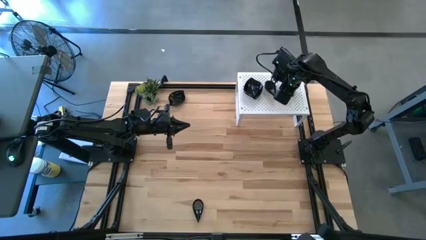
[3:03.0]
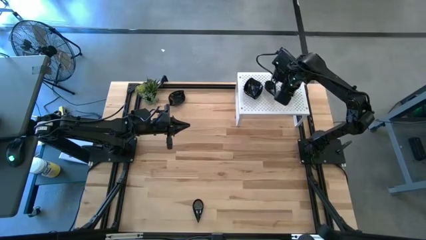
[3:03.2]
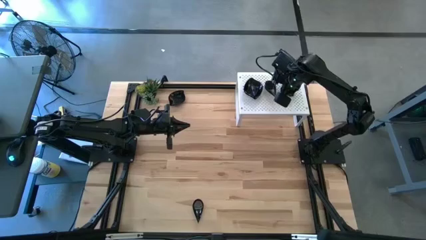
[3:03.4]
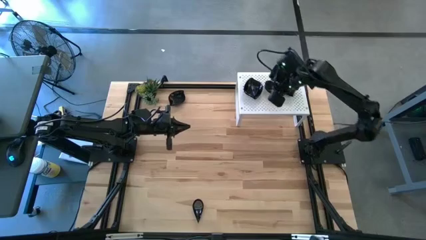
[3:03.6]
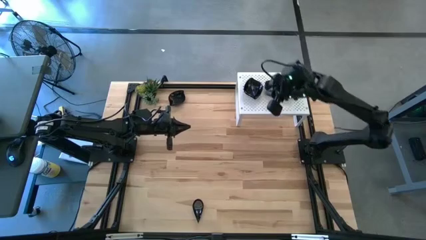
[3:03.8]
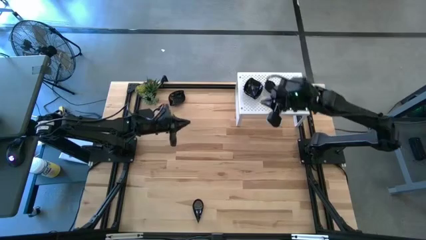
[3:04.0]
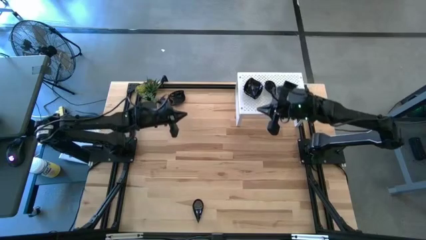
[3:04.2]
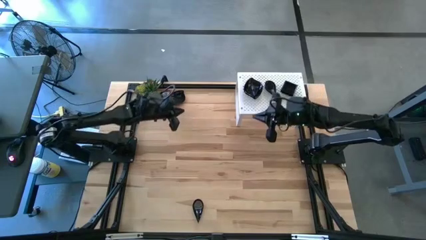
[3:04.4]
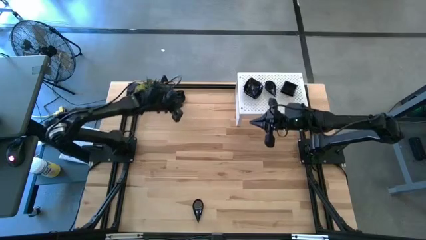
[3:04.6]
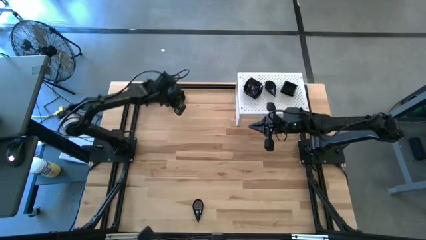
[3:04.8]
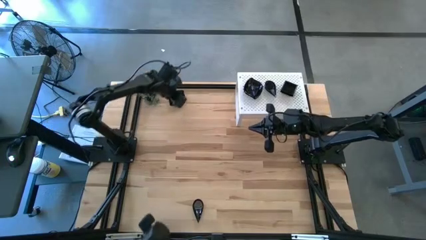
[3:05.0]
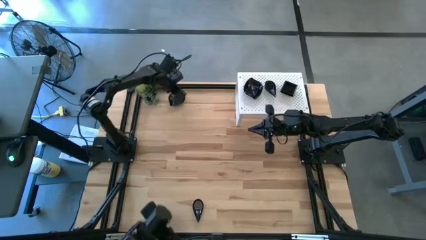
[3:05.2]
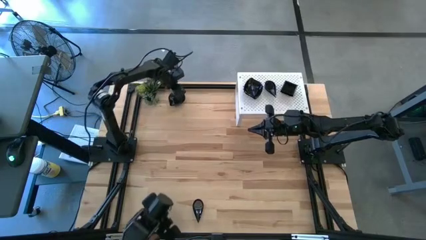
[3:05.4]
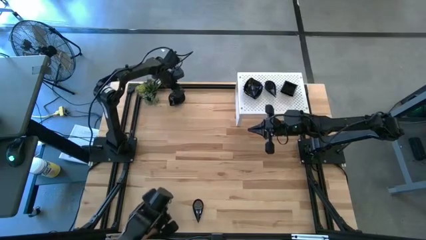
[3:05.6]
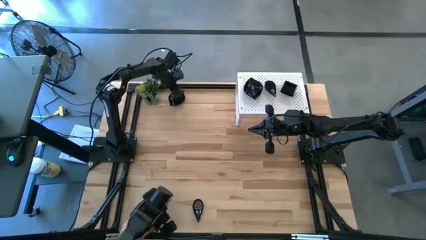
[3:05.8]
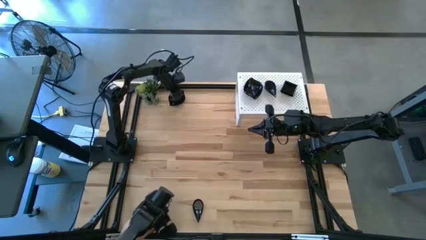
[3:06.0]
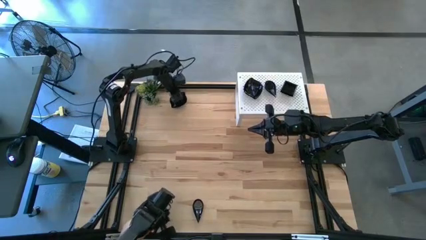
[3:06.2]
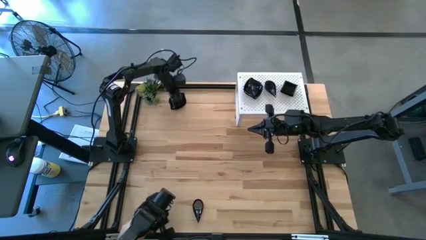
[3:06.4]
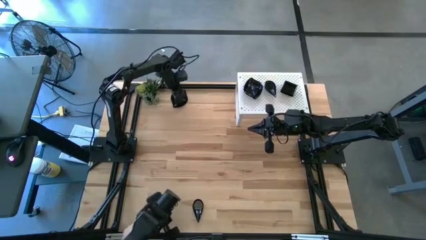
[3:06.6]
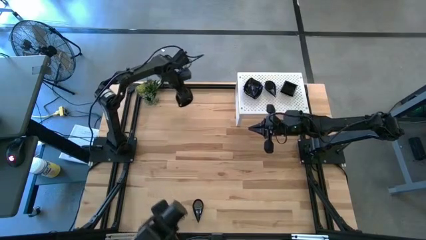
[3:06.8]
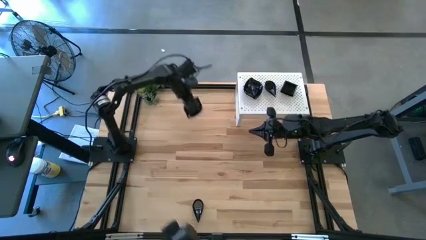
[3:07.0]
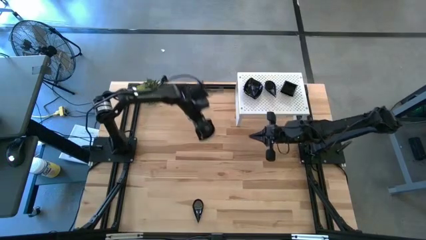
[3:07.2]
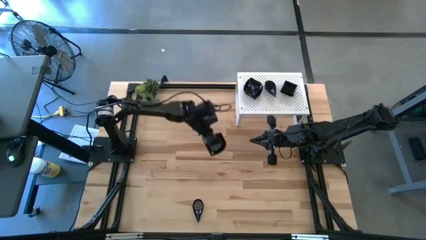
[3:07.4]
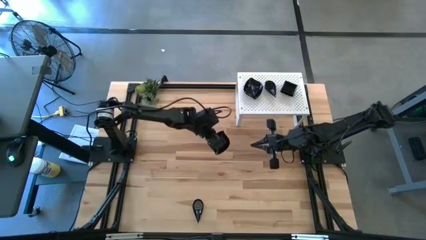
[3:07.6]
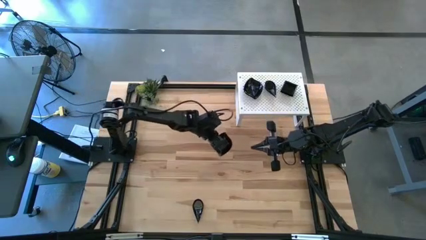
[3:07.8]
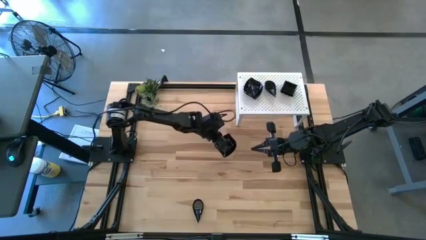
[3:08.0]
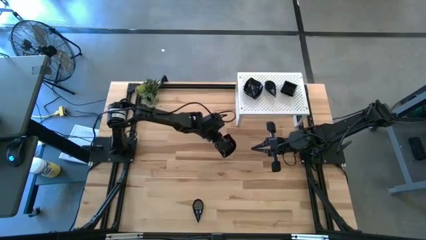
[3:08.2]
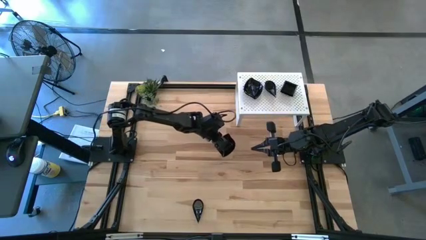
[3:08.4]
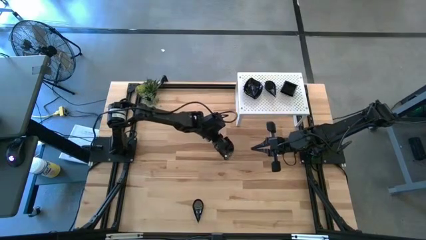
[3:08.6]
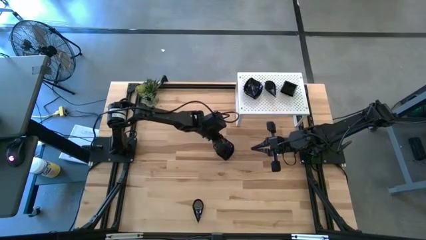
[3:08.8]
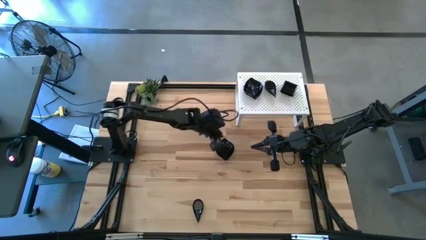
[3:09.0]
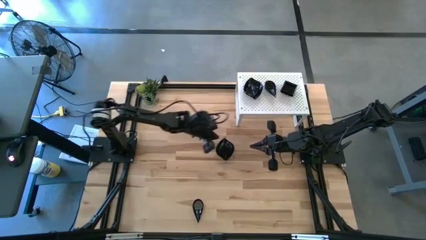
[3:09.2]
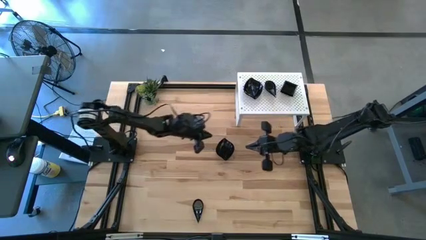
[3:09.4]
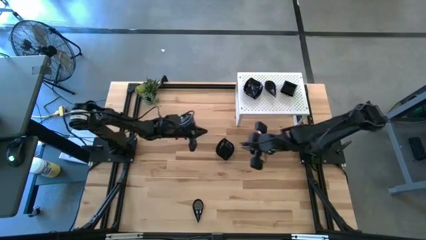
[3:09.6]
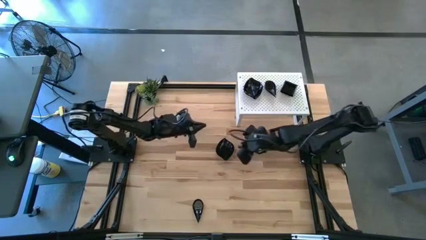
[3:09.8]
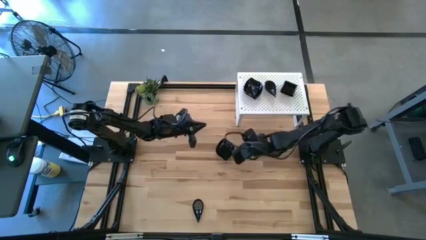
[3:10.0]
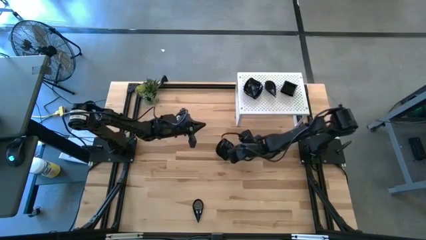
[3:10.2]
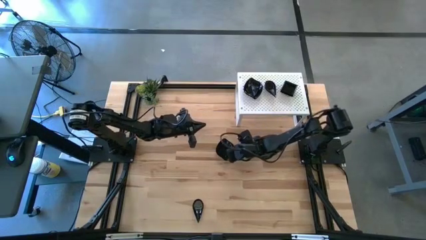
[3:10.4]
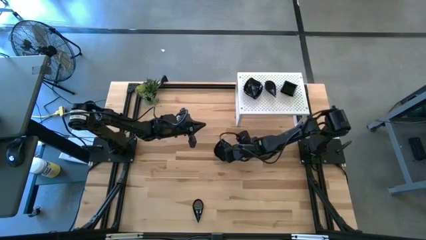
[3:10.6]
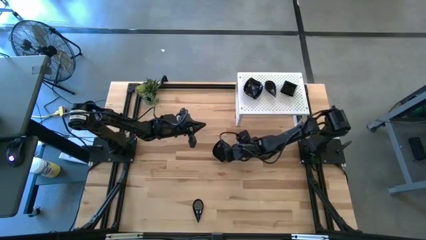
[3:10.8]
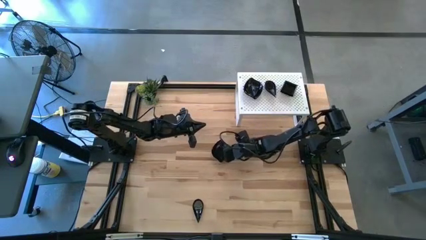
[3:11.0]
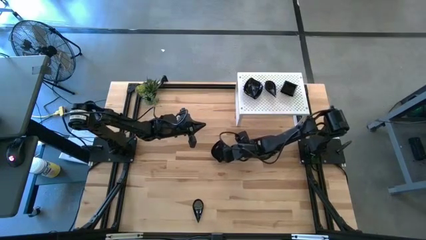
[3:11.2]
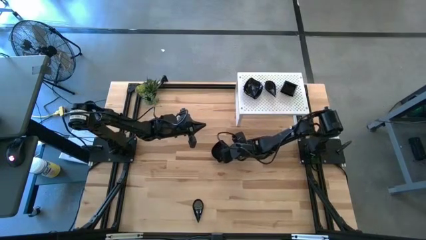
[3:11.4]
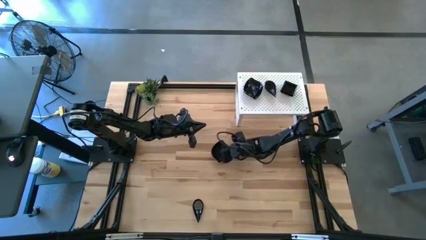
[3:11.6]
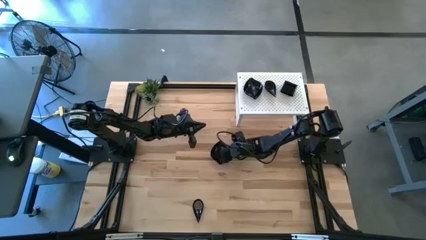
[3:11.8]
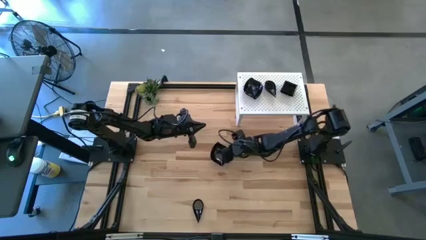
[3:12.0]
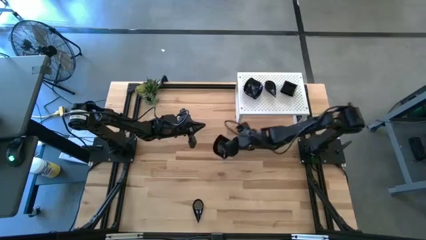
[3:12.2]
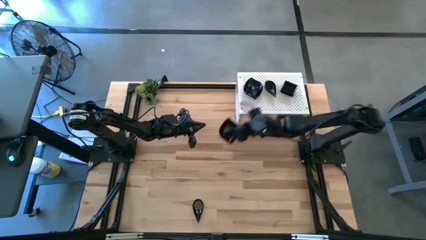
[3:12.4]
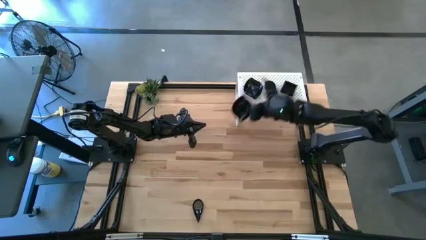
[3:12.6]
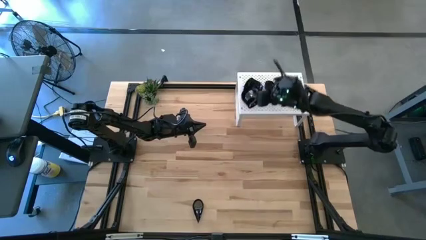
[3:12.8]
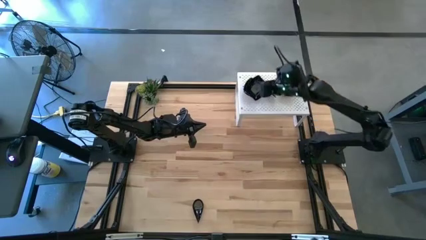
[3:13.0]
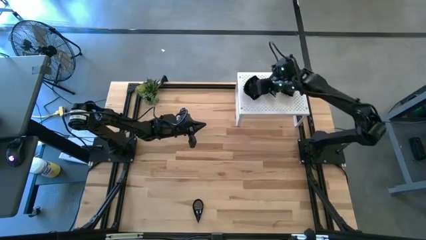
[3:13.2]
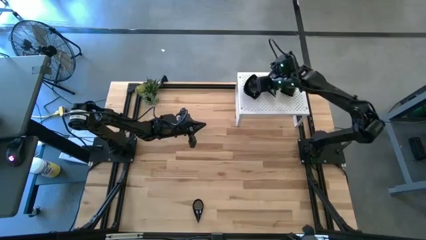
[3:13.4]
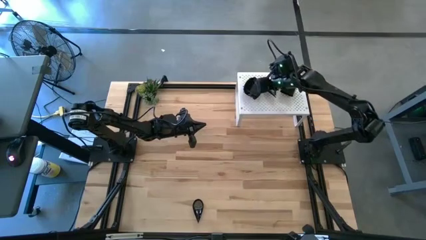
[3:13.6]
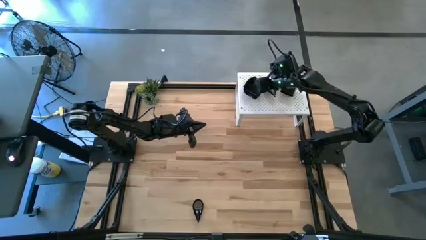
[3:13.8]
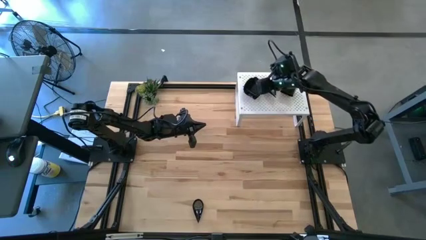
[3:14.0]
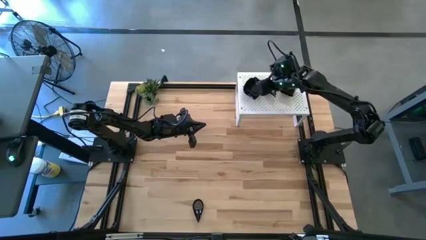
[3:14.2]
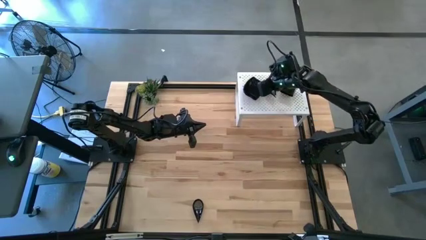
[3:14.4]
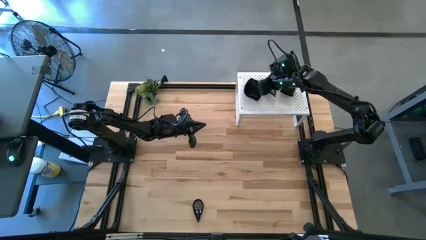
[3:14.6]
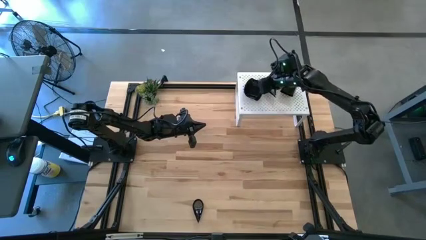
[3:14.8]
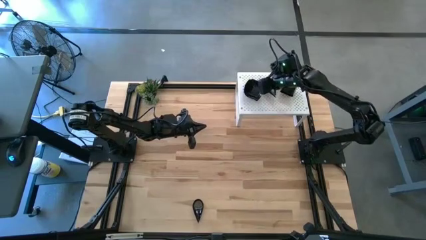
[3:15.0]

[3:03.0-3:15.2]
Task: Pick & Place Mini shaped plates
Stack the black leaf-shaped plate on top of the black leaf-shaped plates on the shelf

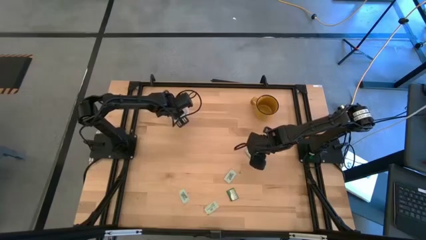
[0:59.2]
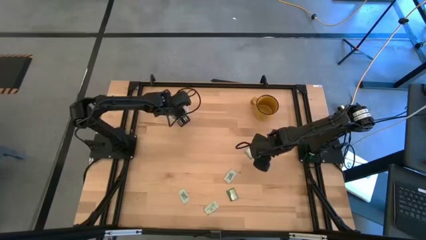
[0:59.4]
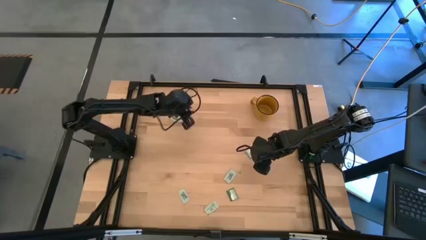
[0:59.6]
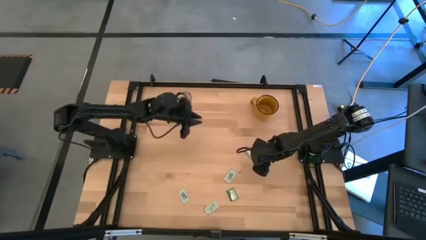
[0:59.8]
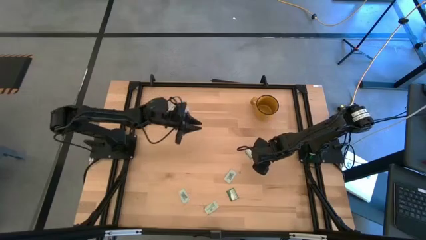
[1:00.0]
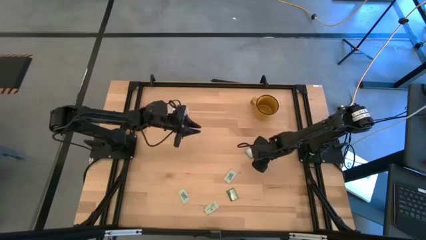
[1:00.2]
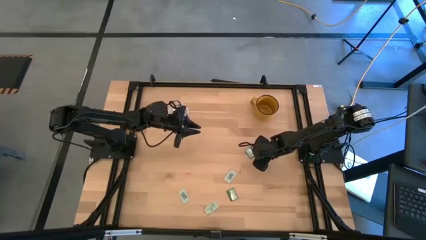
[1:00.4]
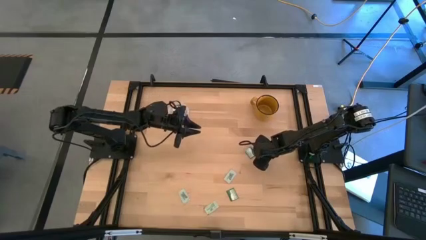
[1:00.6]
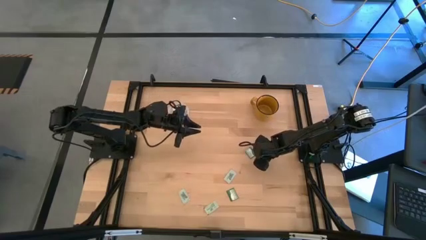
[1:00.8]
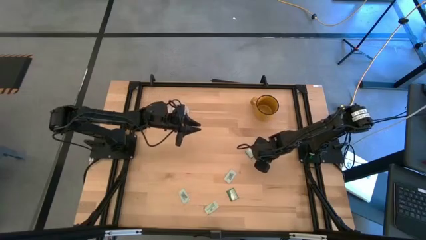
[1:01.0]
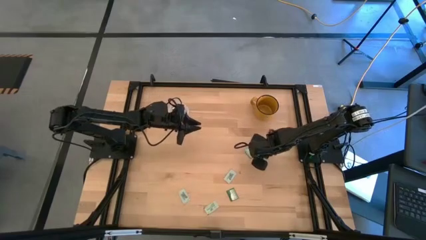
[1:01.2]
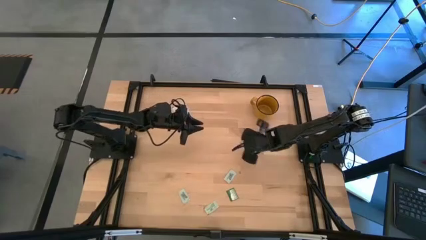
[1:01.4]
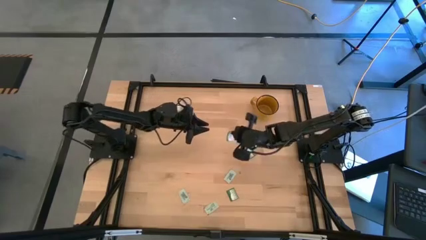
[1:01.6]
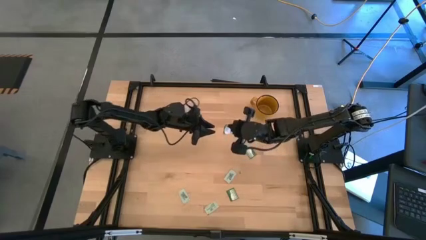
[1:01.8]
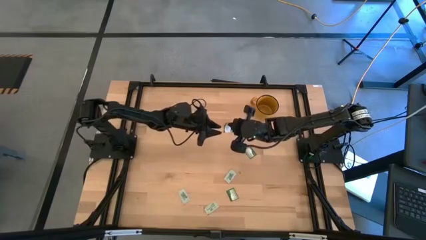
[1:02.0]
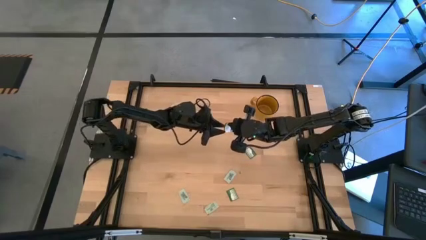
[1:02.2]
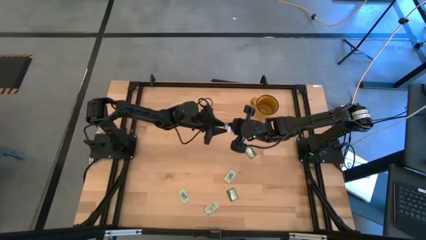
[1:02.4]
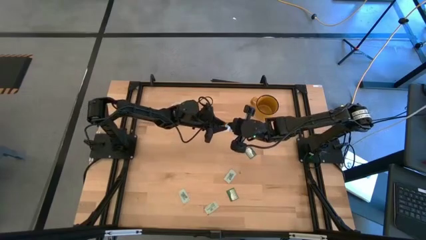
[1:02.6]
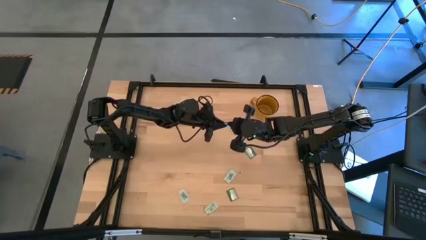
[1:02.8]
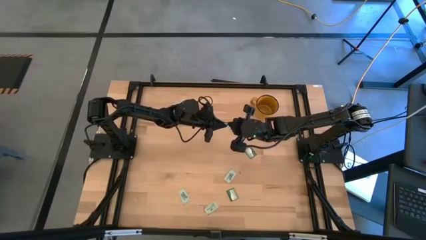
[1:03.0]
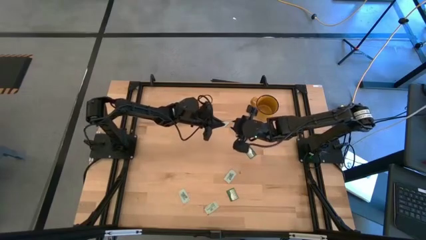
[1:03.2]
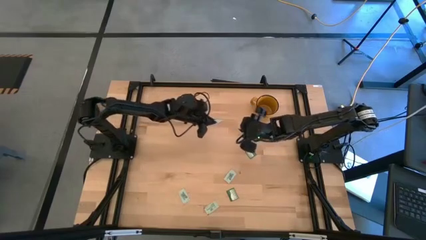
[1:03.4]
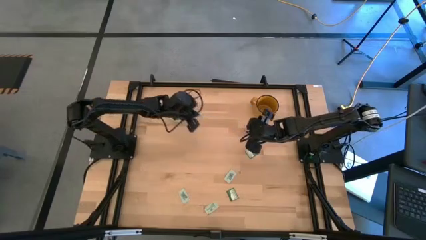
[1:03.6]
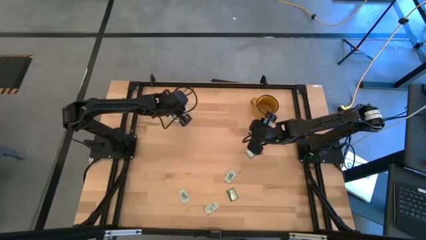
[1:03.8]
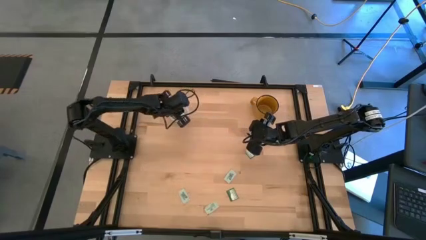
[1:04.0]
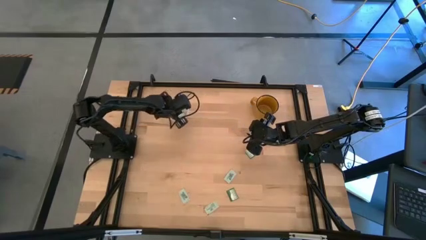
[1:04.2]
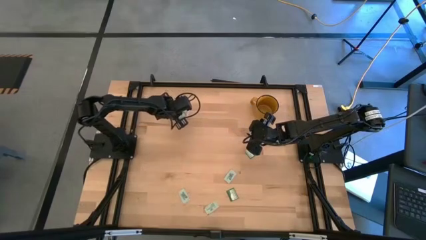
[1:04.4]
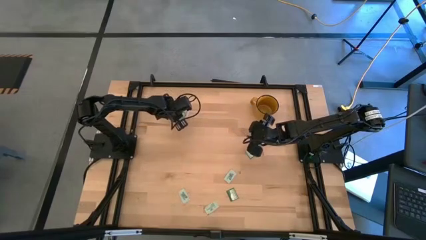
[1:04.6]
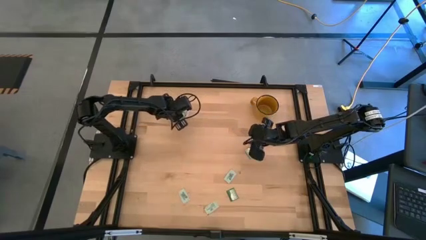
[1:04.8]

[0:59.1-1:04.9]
Task: Pick and place Stevia / Truvia into bins
Put the truvia packet into the transparent container
